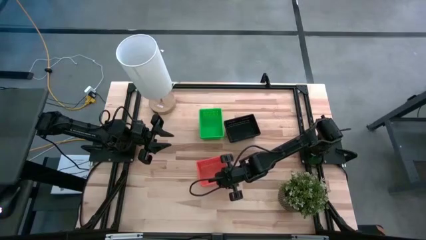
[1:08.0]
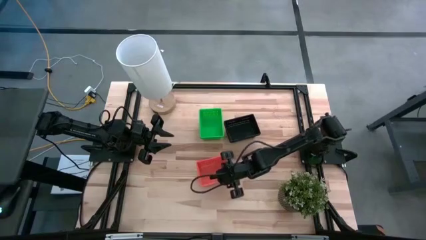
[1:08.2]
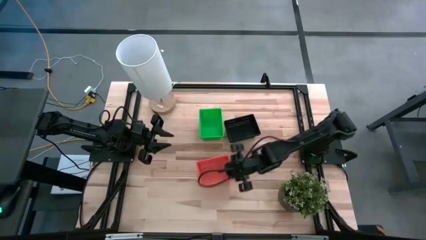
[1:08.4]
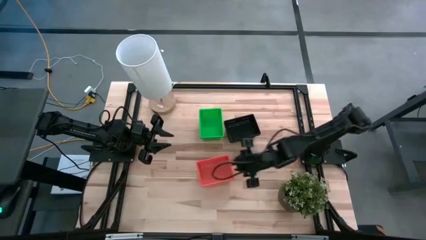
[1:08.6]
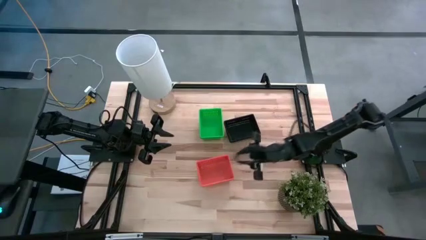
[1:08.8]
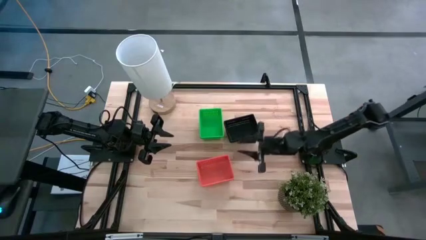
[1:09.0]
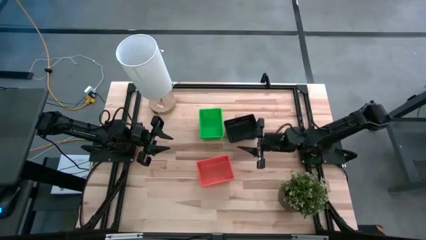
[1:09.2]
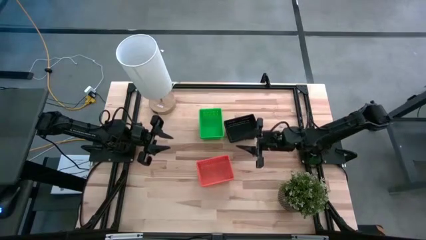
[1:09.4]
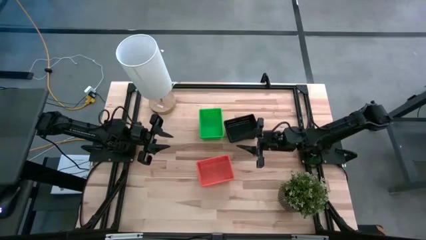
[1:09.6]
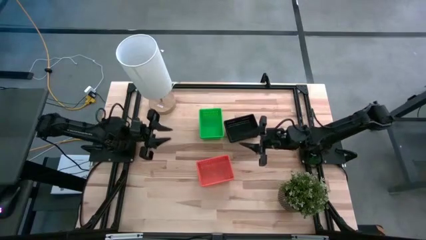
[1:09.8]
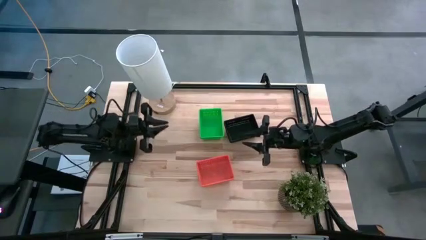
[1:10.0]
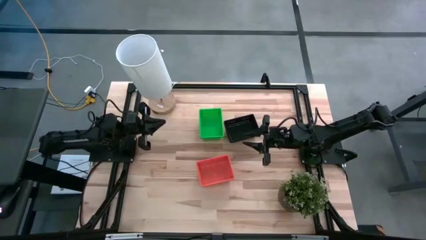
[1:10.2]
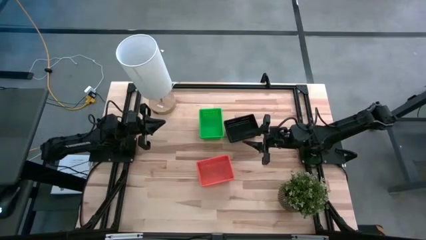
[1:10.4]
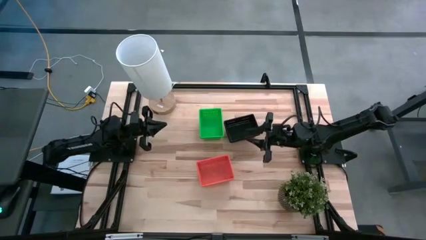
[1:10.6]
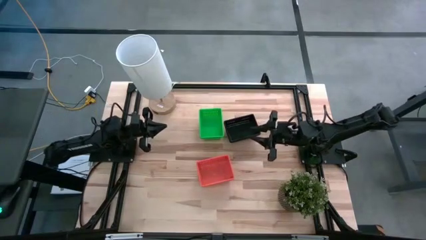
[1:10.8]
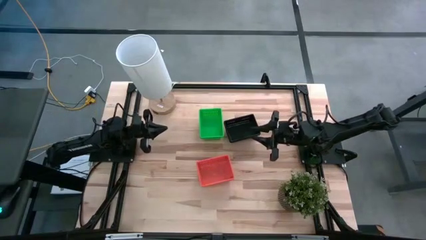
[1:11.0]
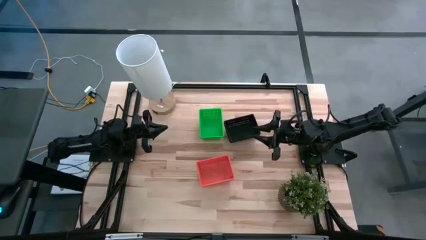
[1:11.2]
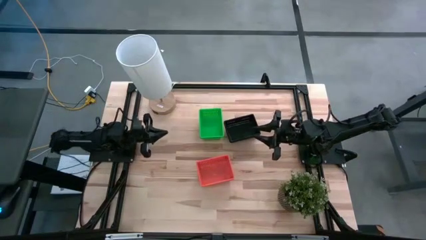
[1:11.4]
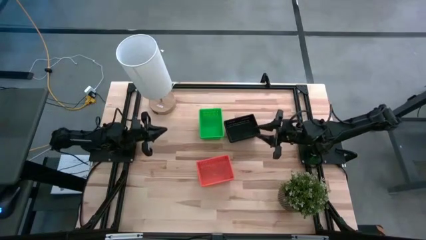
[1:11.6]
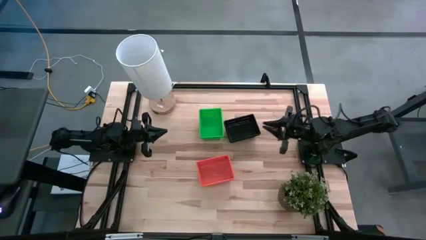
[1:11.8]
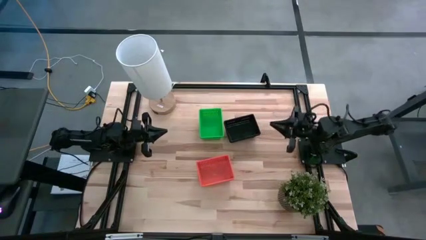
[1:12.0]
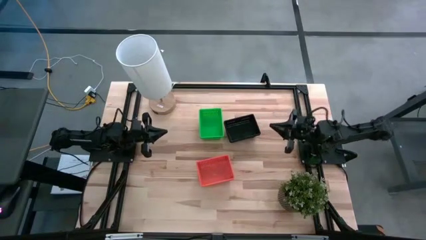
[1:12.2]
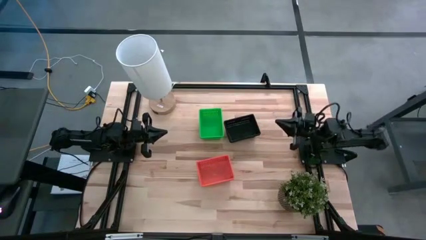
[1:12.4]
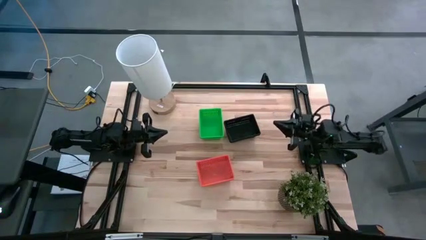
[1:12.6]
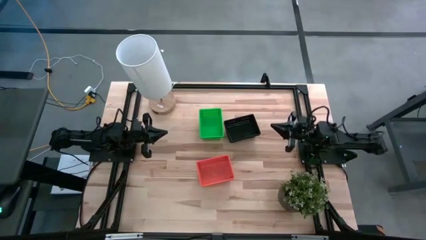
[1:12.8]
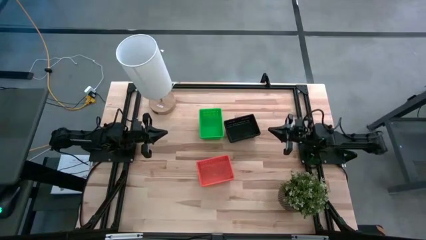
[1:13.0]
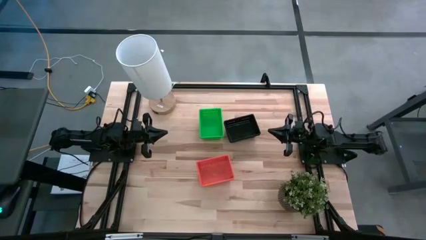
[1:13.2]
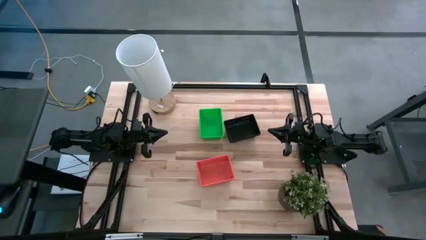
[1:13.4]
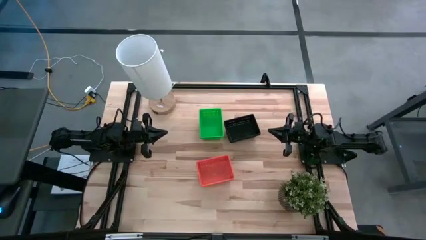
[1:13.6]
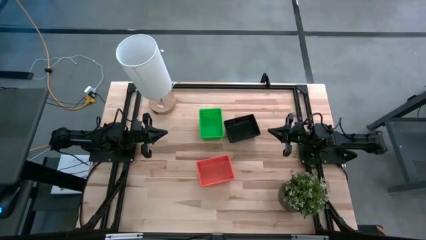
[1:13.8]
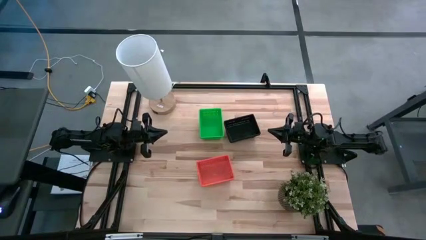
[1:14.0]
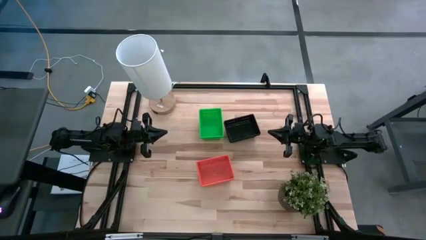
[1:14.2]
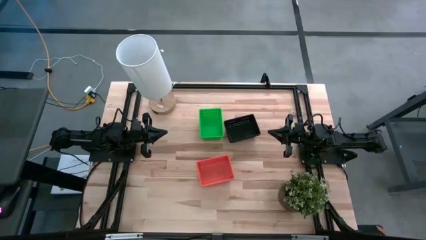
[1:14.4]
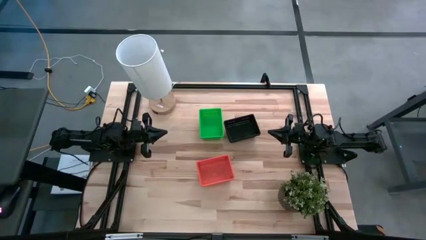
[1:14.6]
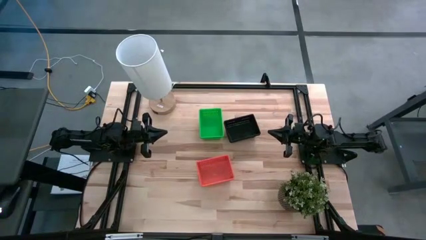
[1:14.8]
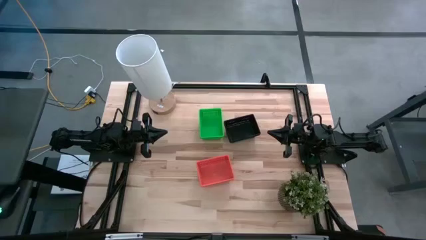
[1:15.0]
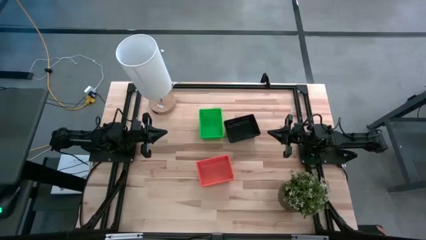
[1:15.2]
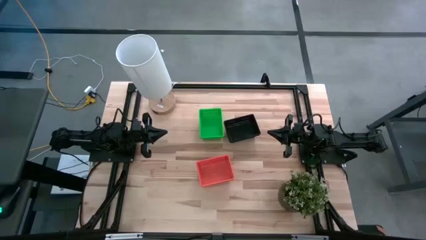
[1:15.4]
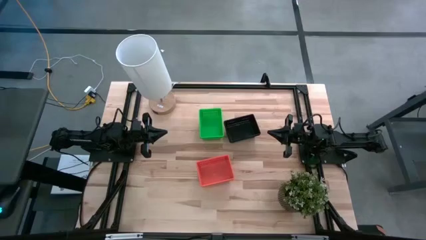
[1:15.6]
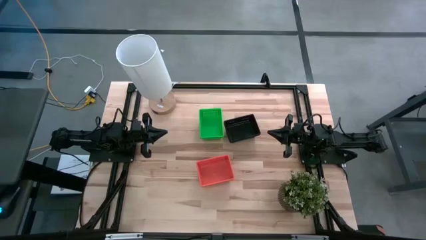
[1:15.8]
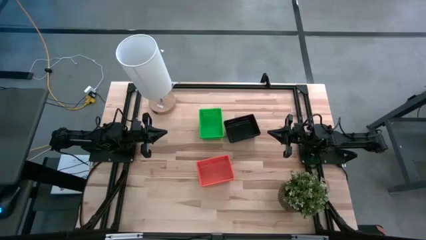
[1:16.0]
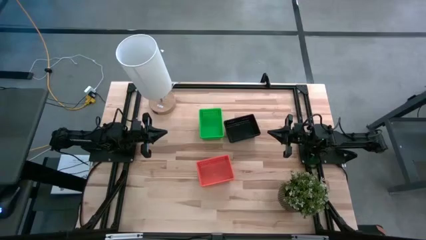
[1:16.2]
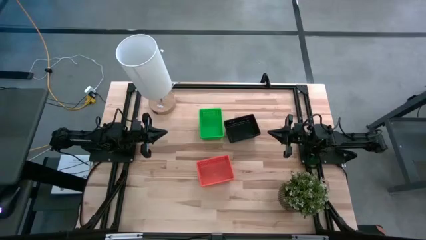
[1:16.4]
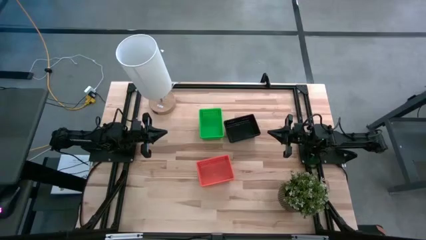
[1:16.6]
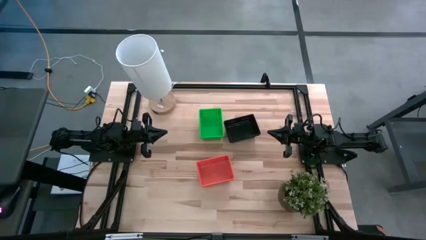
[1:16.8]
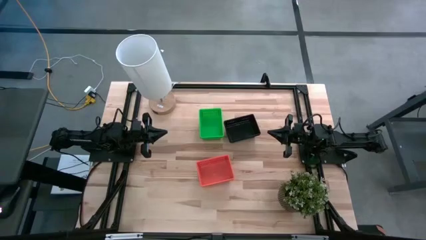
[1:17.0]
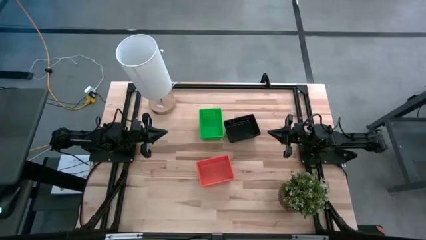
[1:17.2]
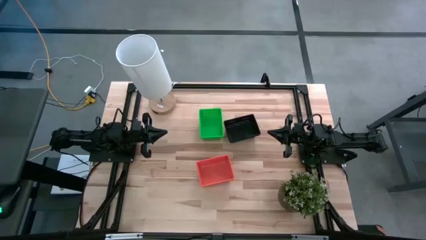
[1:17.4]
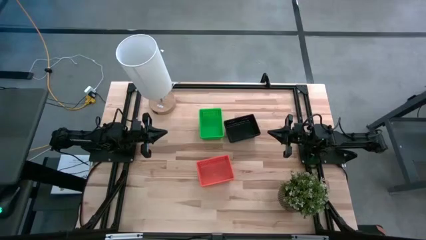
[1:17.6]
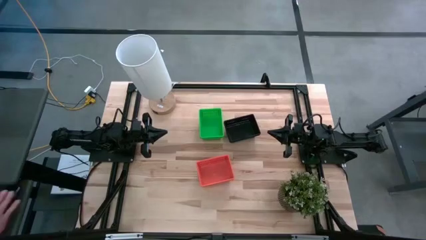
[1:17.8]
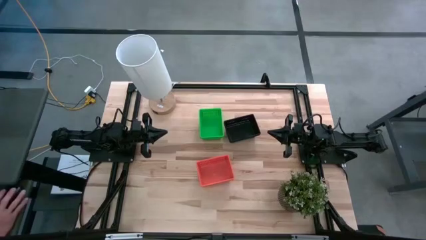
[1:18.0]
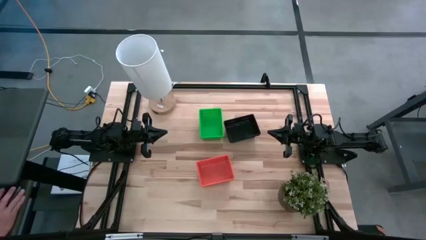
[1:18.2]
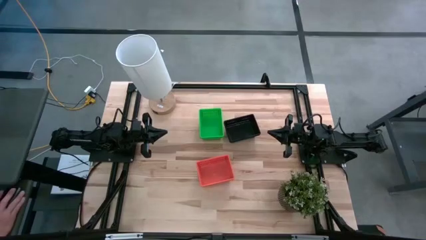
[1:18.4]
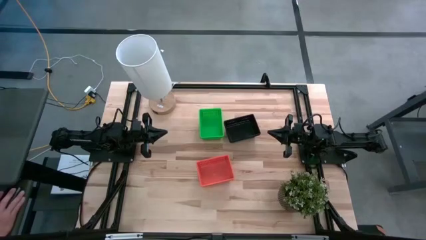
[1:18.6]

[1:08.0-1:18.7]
Return to Home Position

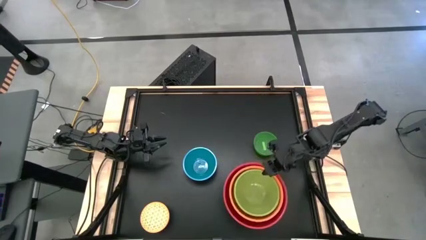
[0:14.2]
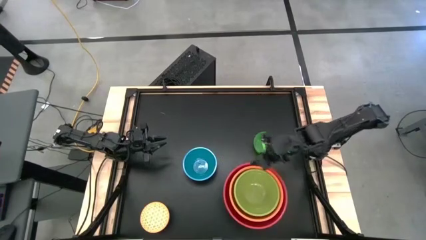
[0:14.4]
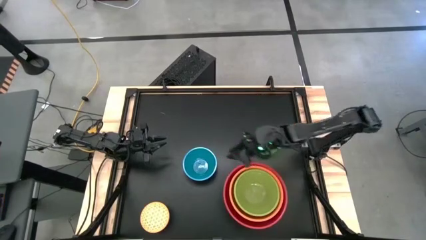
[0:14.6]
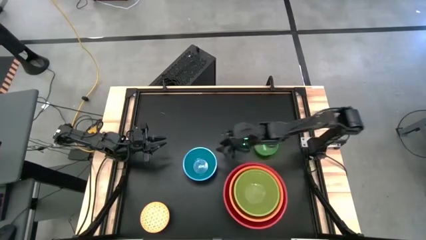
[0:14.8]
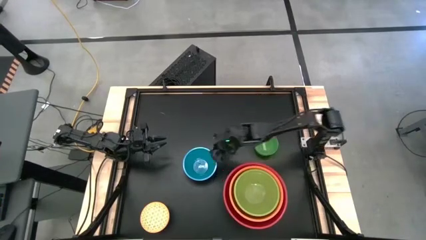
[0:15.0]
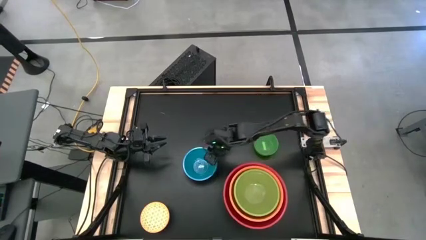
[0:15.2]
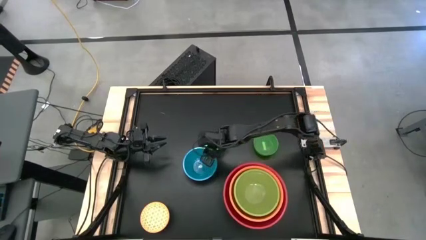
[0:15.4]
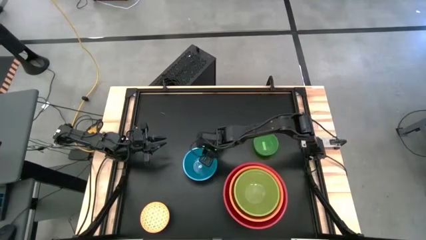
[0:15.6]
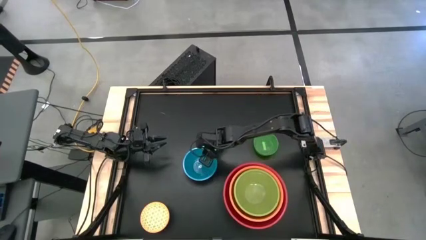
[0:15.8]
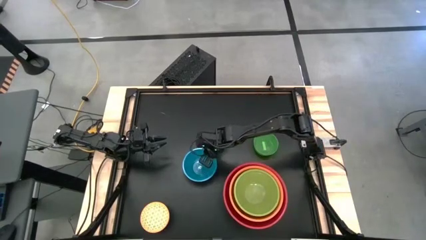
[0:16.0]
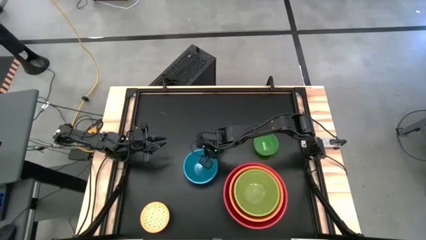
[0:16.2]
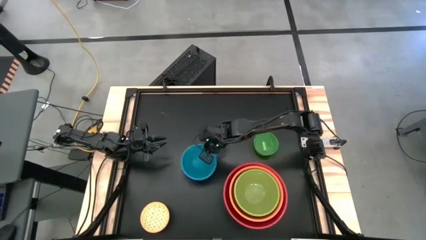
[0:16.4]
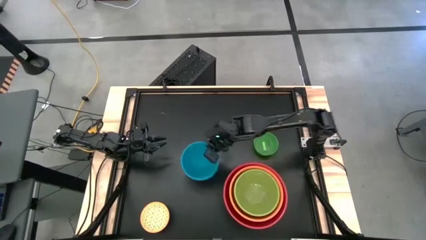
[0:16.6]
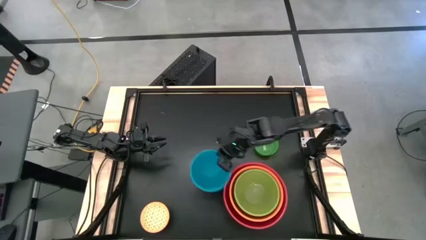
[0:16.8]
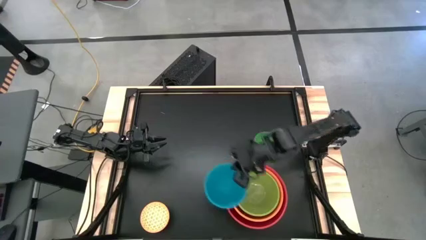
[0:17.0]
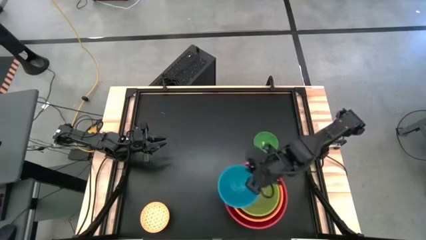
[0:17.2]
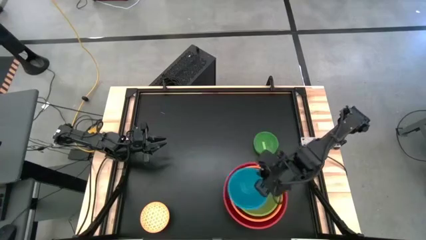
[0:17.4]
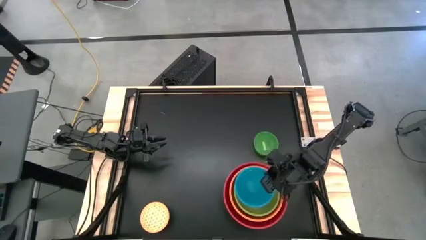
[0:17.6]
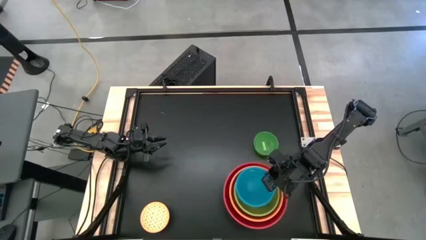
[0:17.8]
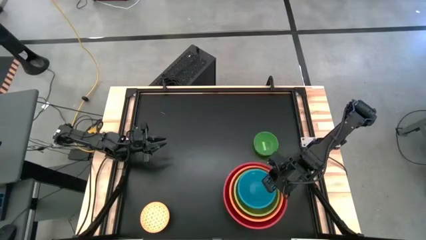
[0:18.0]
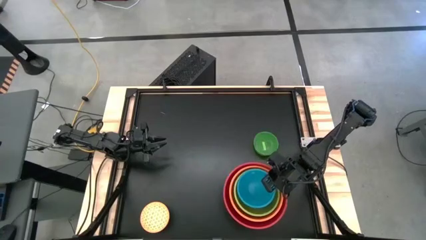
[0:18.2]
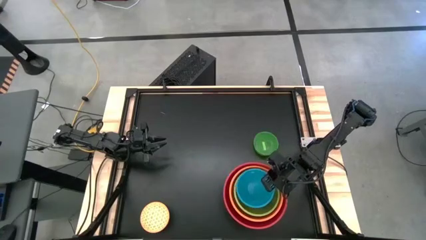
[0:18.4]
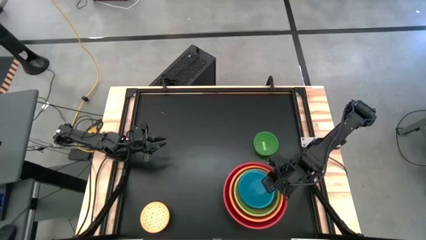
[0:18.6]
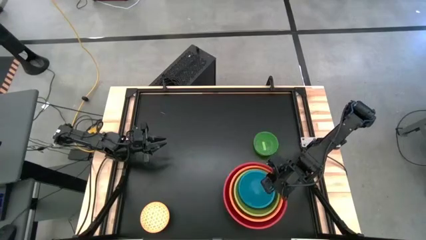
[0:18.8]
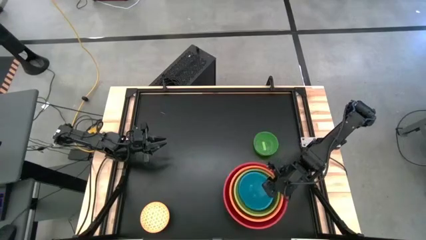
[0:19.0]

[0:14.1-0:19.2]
Stack the blue bowl on top of the light green bowl
